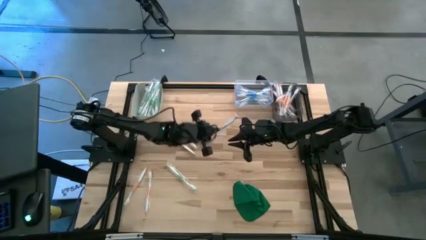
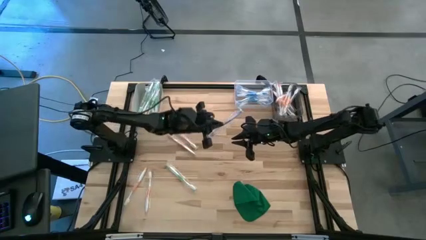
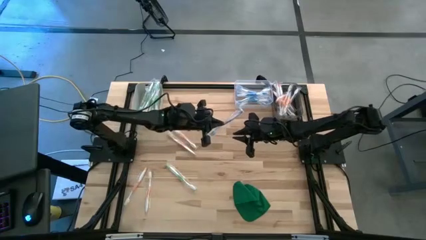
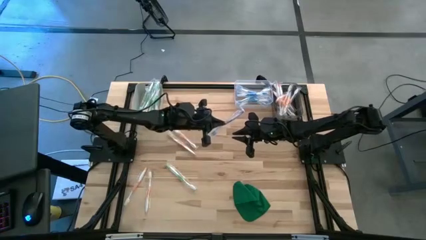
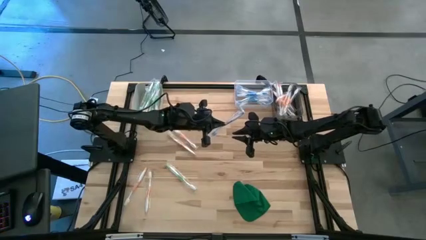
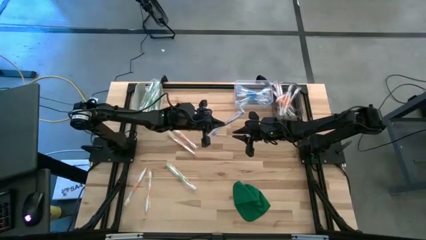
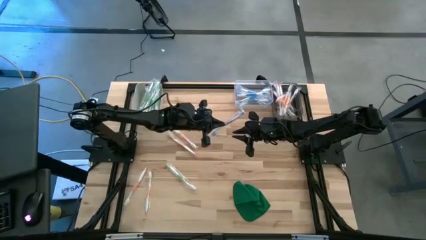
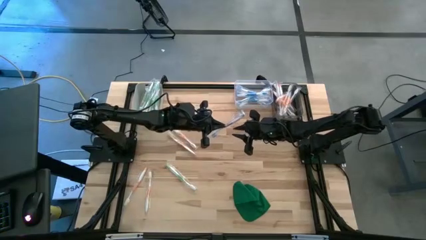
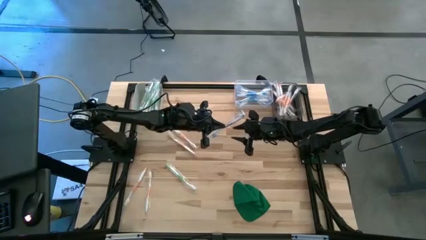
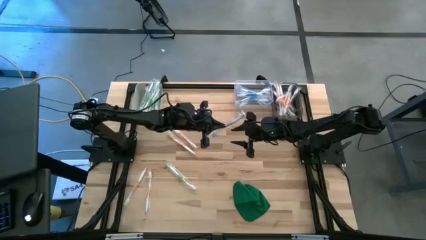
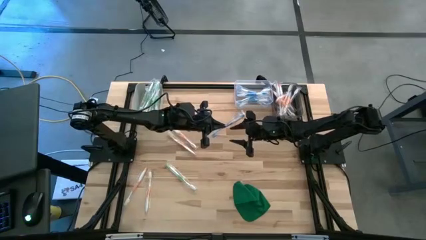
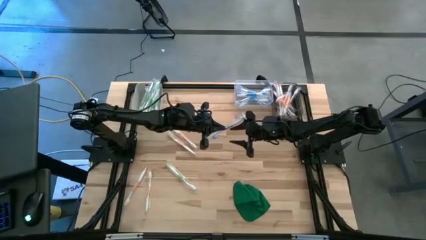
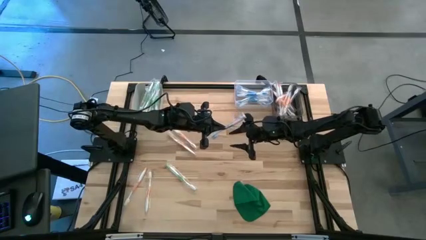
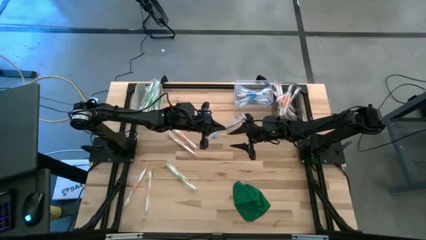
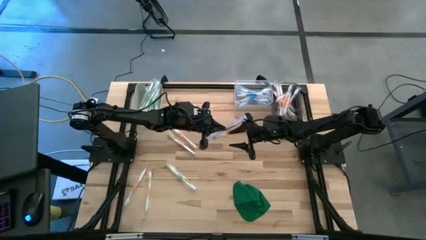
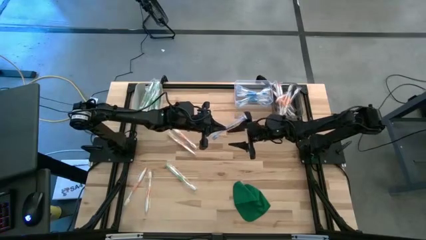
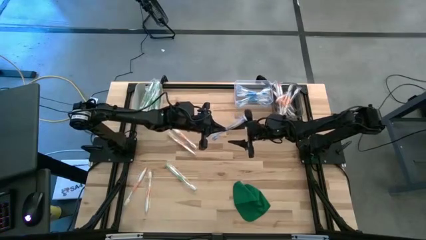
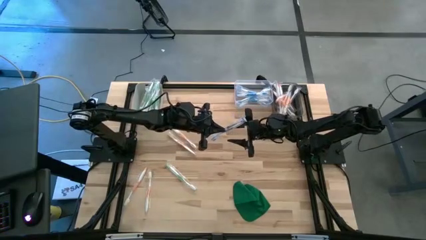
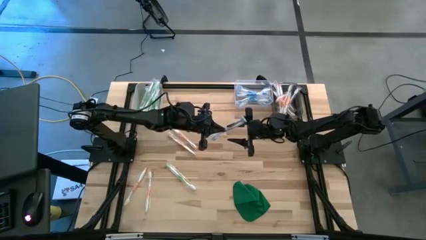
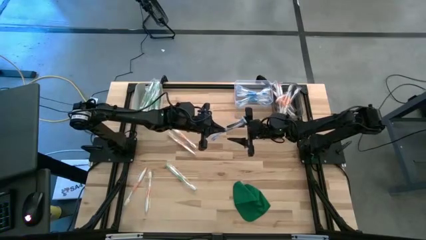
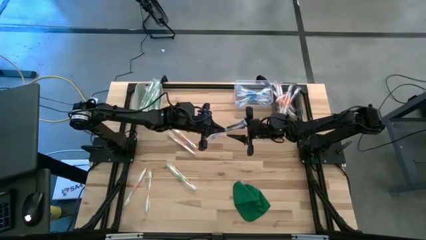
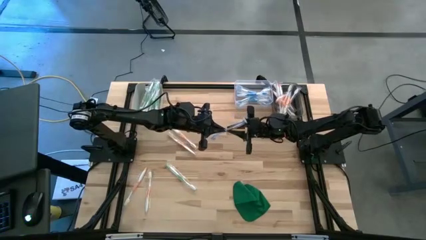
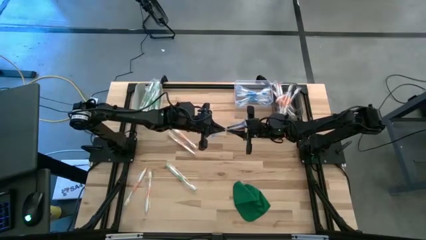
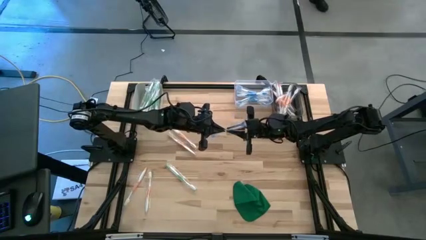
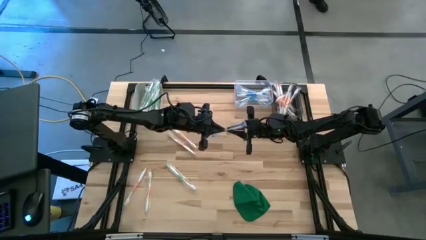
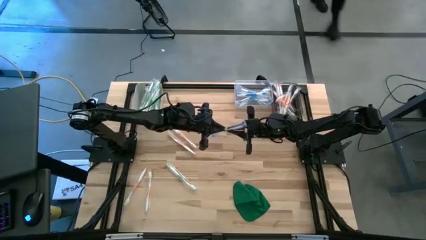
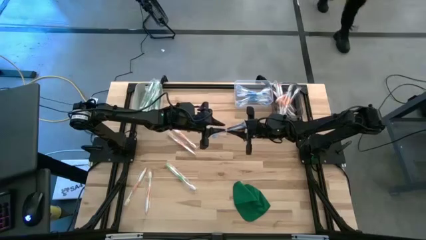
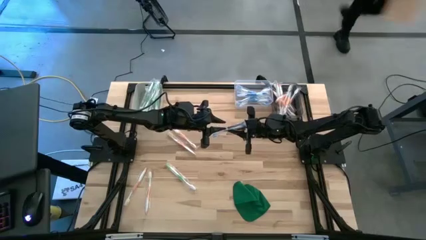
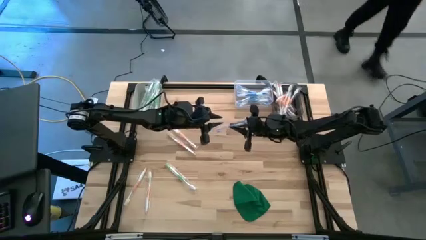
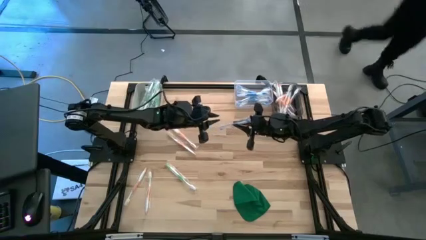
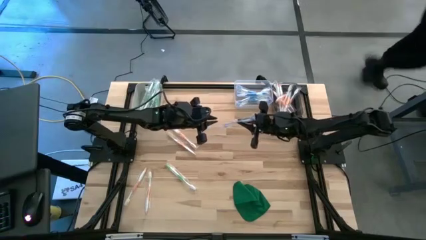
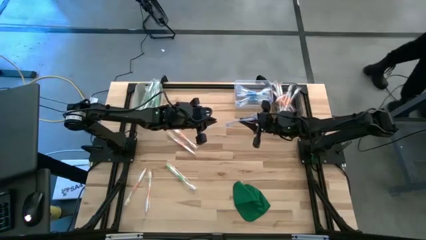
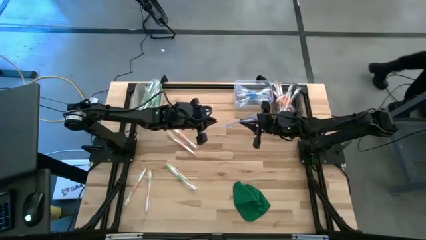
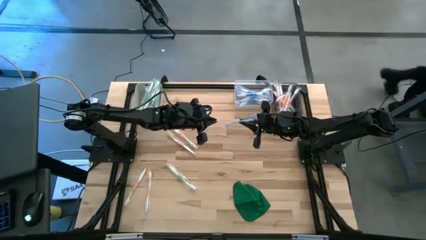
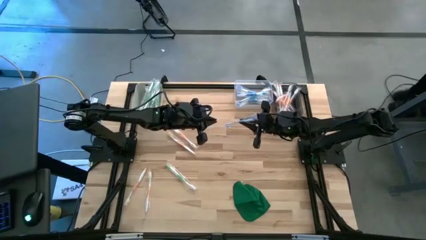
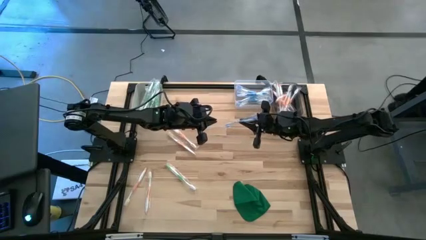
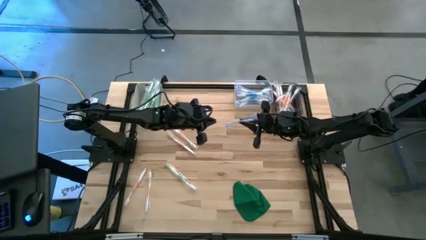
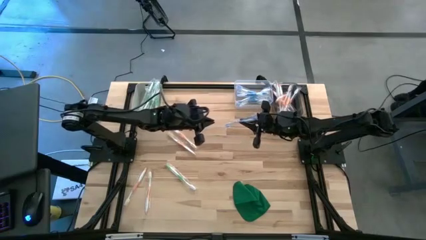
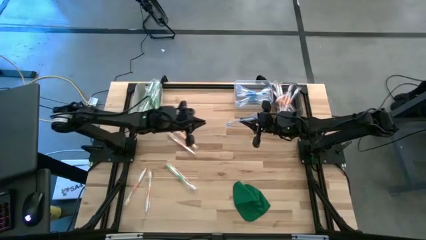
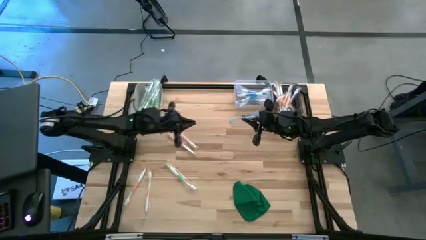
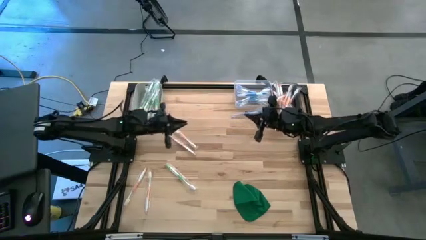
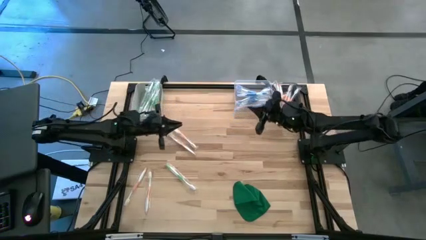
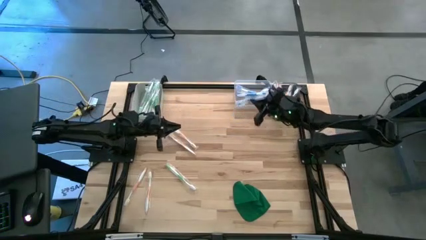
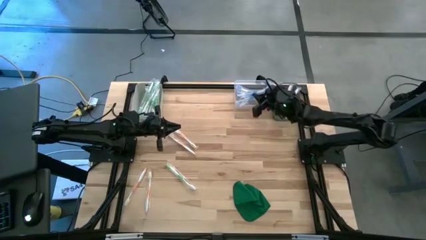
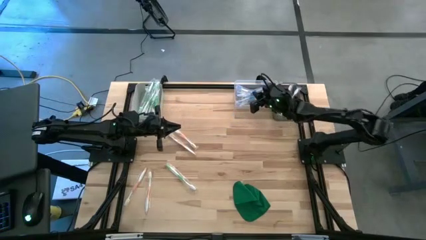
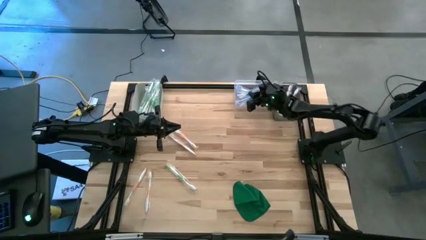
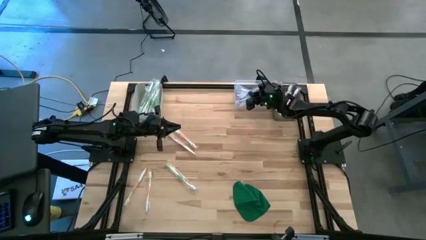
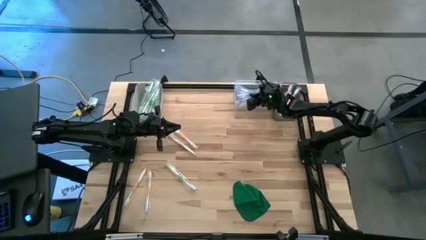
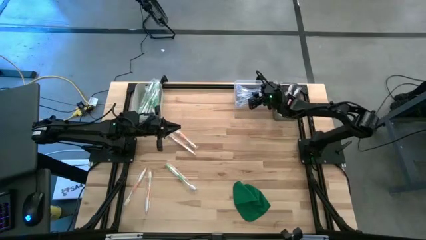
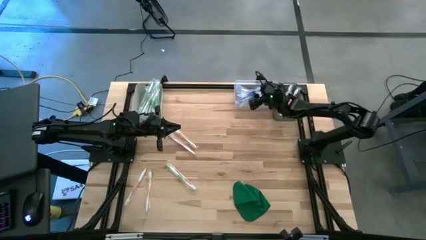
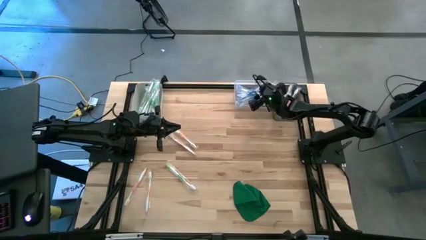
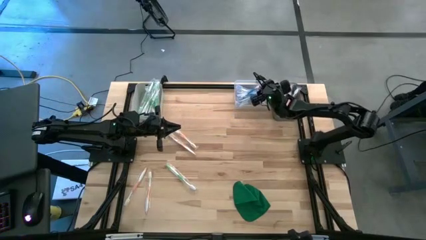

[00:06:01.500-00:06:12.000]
Task: Pick & Place Toothbrushes
Put the blue toothbrush into the transparent bin
